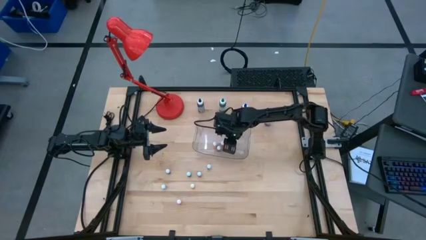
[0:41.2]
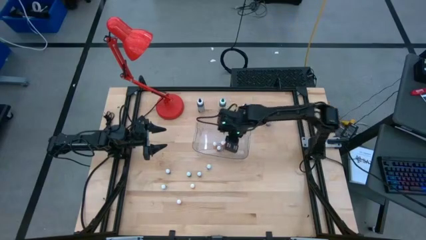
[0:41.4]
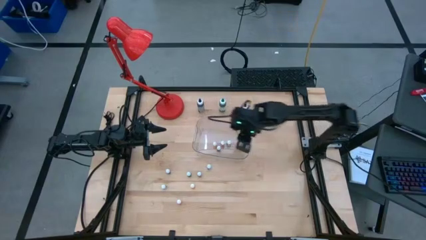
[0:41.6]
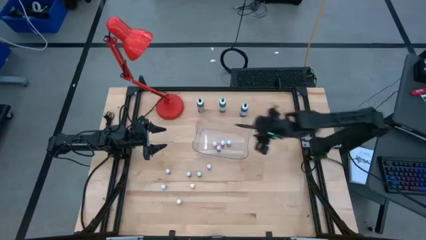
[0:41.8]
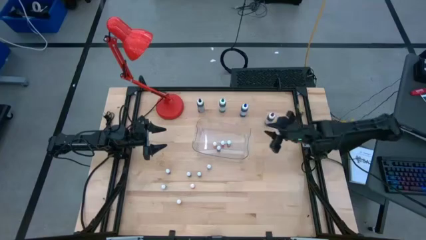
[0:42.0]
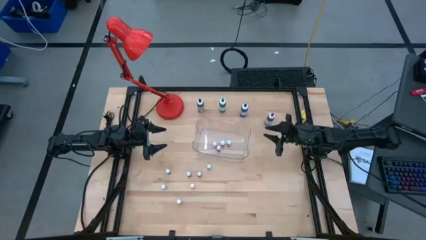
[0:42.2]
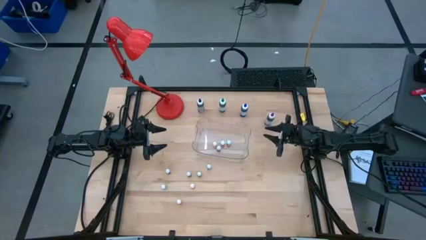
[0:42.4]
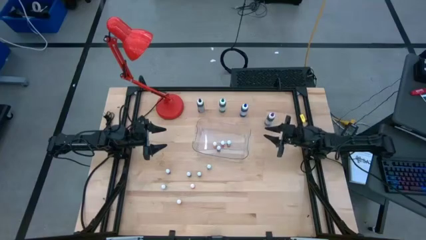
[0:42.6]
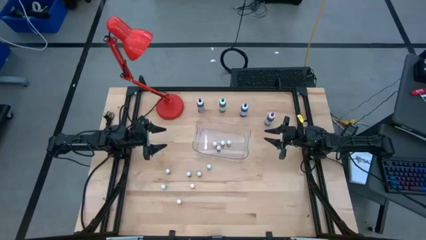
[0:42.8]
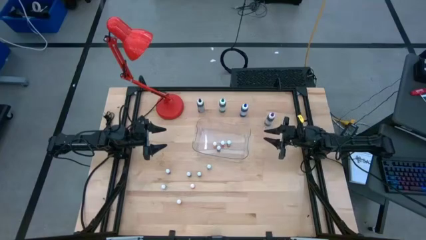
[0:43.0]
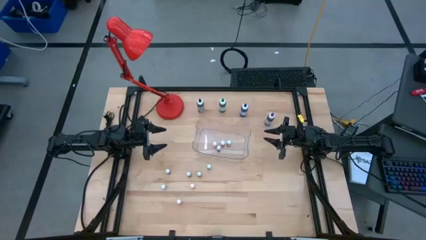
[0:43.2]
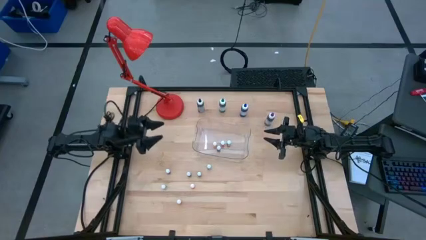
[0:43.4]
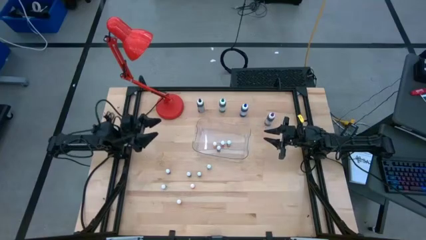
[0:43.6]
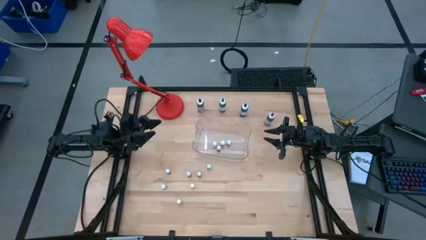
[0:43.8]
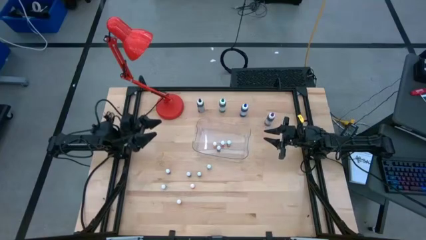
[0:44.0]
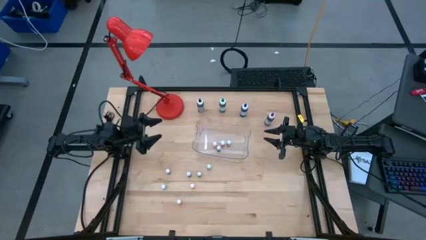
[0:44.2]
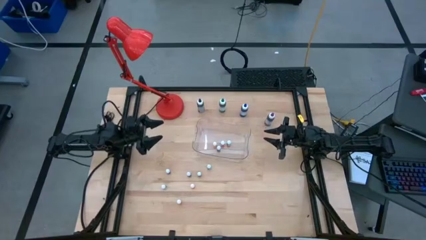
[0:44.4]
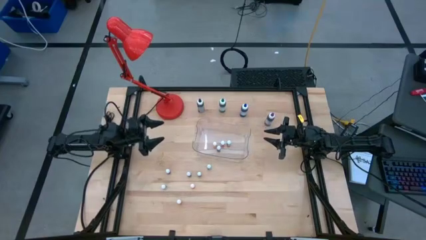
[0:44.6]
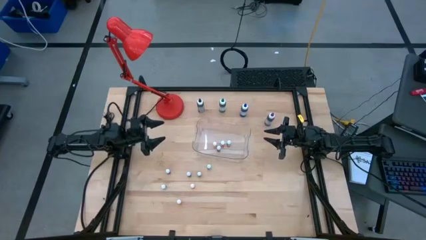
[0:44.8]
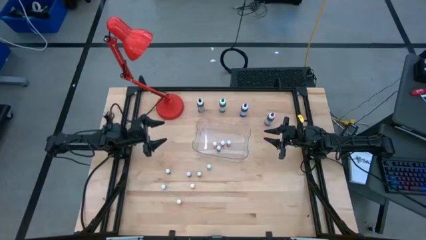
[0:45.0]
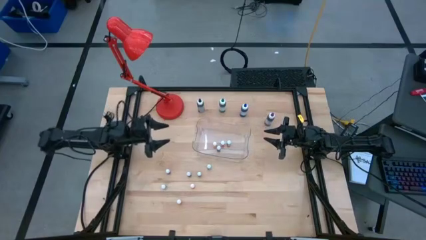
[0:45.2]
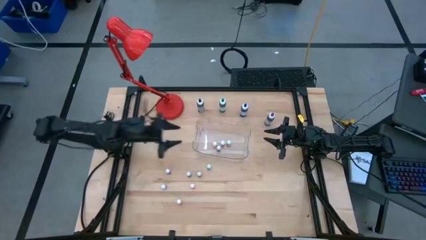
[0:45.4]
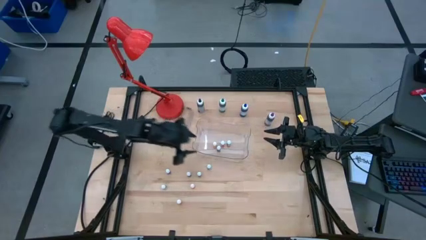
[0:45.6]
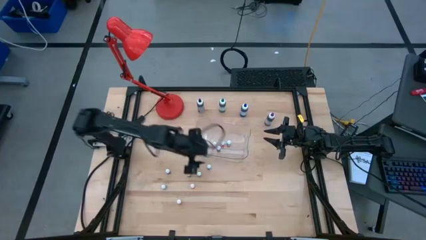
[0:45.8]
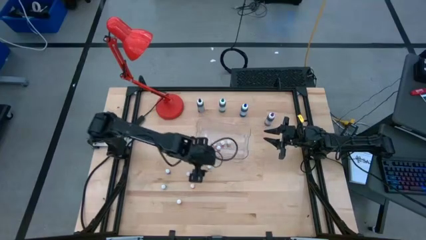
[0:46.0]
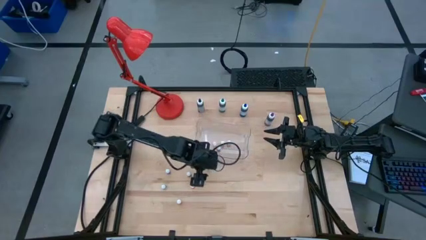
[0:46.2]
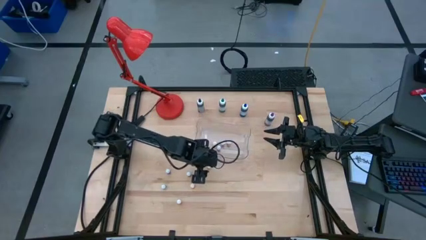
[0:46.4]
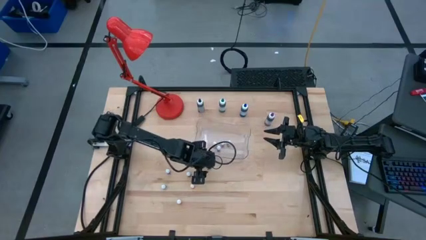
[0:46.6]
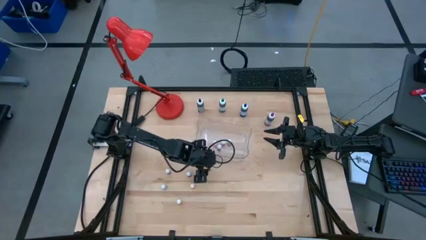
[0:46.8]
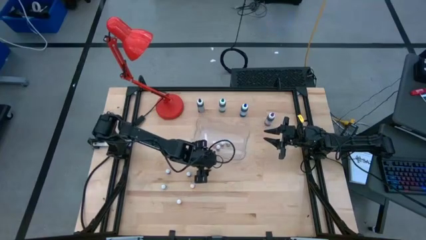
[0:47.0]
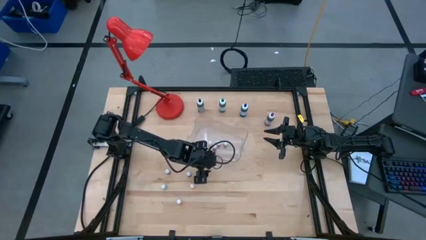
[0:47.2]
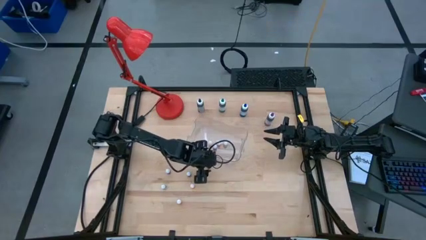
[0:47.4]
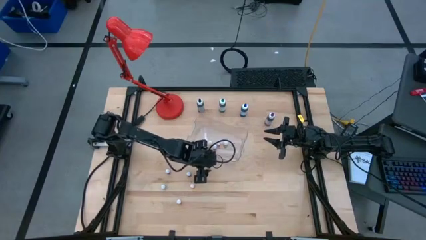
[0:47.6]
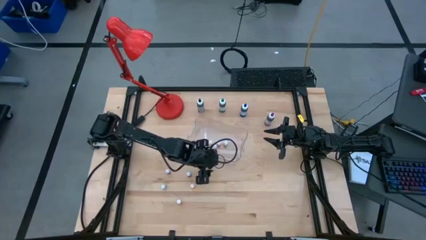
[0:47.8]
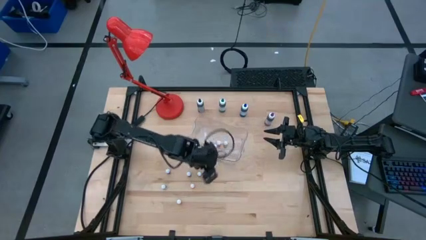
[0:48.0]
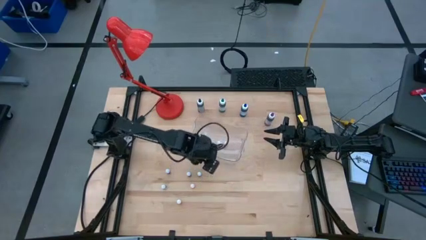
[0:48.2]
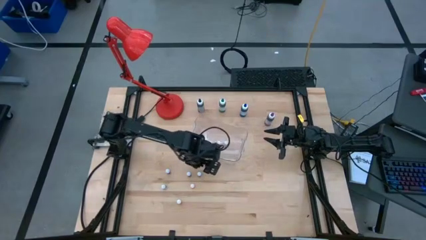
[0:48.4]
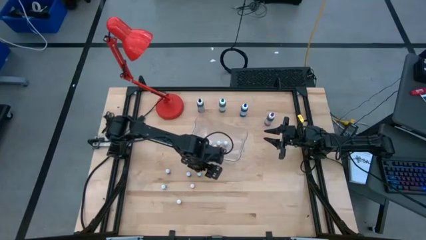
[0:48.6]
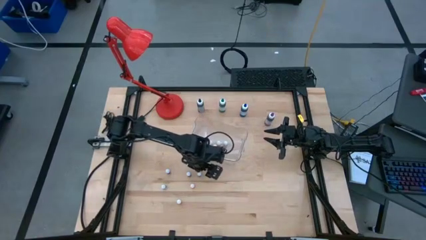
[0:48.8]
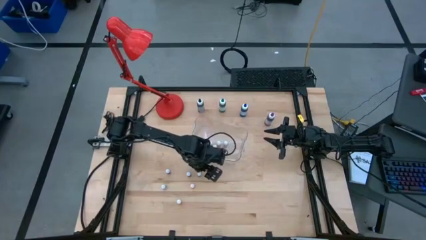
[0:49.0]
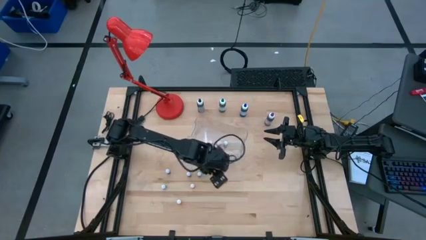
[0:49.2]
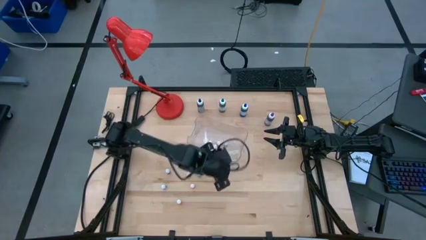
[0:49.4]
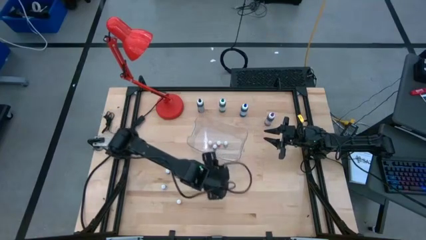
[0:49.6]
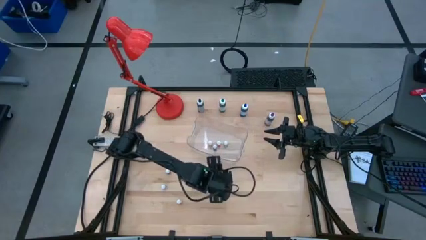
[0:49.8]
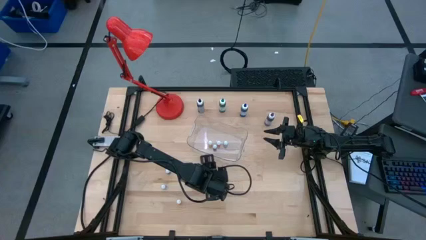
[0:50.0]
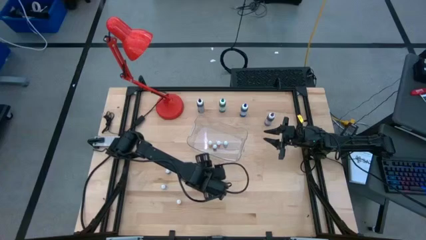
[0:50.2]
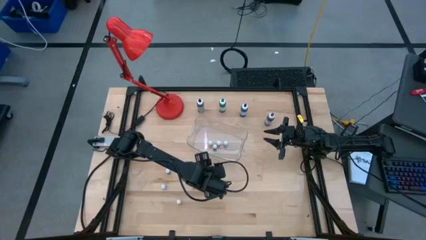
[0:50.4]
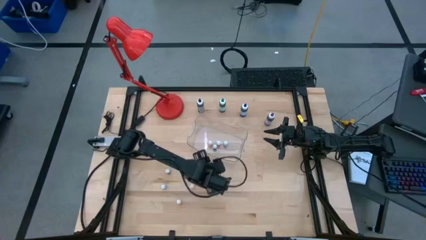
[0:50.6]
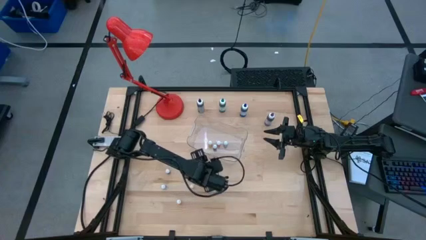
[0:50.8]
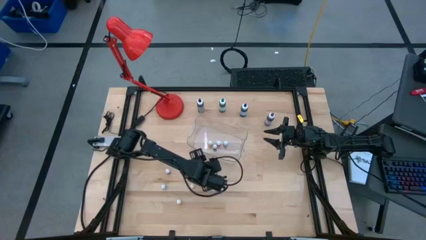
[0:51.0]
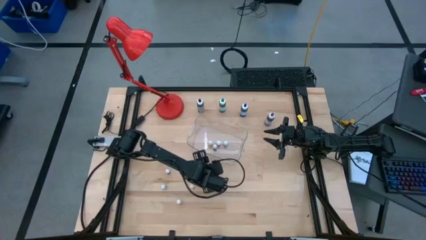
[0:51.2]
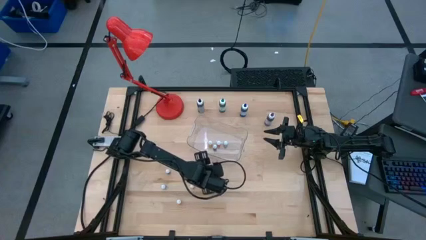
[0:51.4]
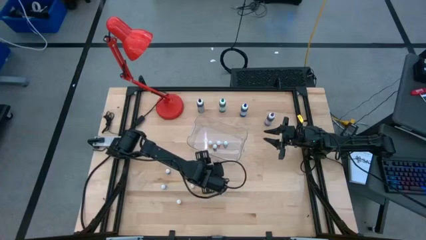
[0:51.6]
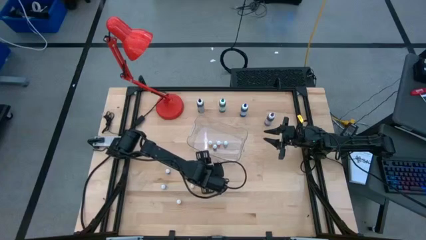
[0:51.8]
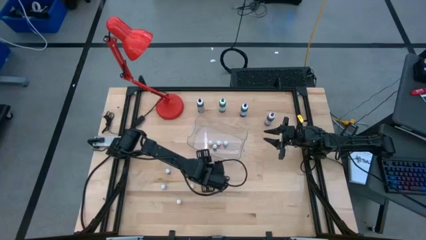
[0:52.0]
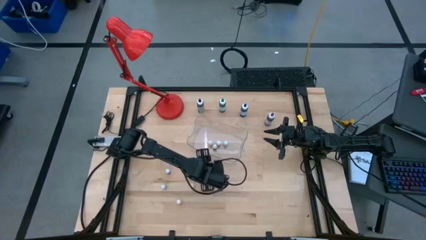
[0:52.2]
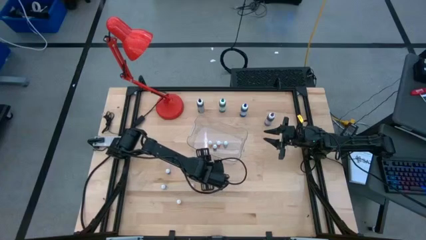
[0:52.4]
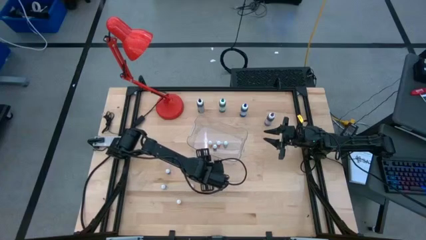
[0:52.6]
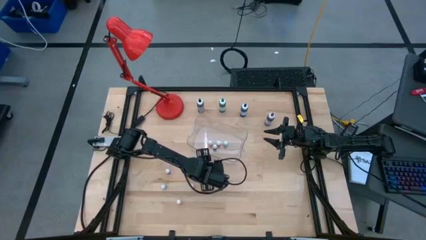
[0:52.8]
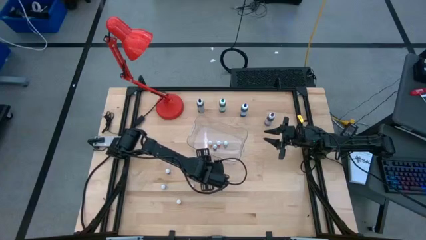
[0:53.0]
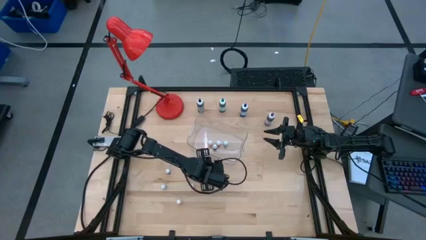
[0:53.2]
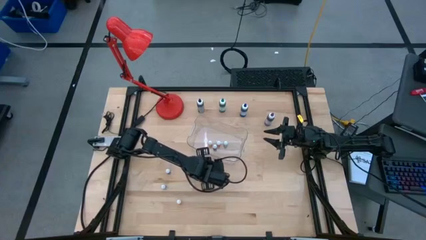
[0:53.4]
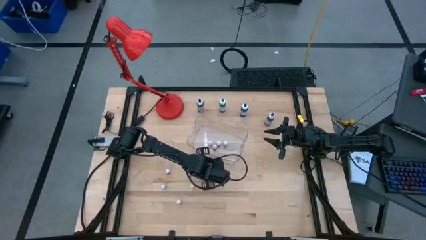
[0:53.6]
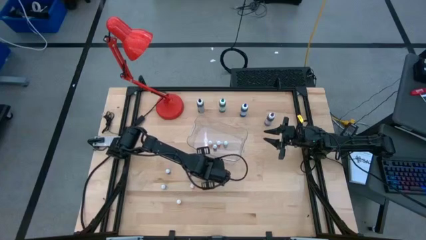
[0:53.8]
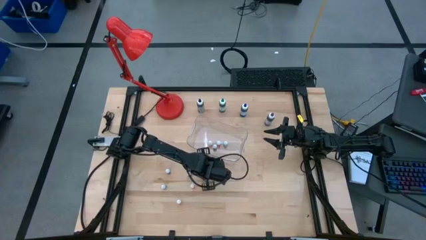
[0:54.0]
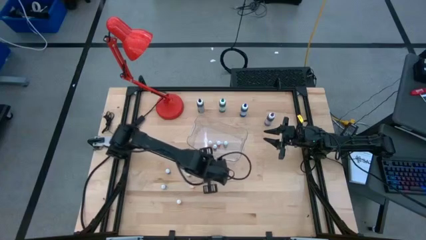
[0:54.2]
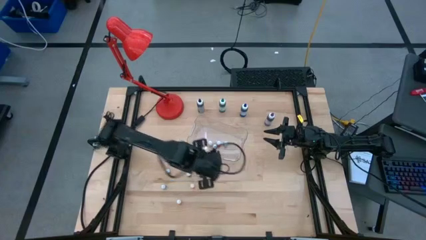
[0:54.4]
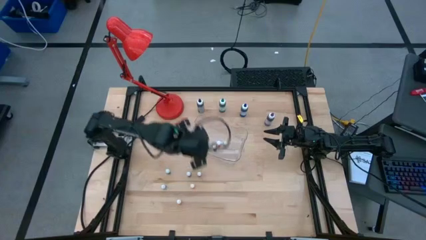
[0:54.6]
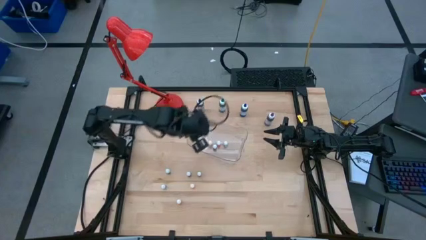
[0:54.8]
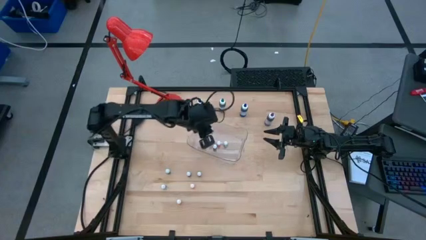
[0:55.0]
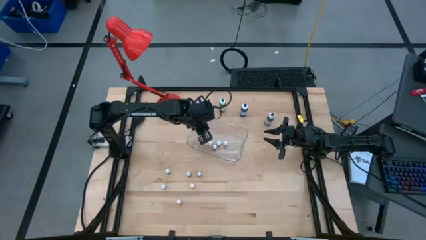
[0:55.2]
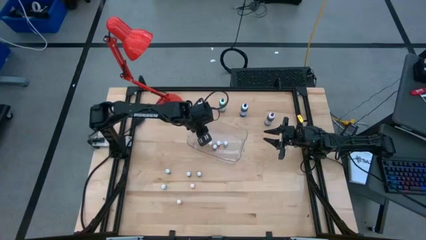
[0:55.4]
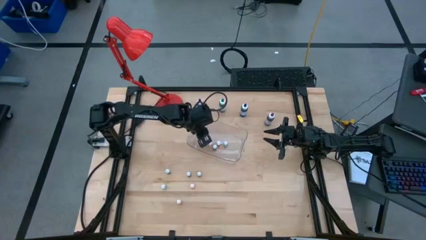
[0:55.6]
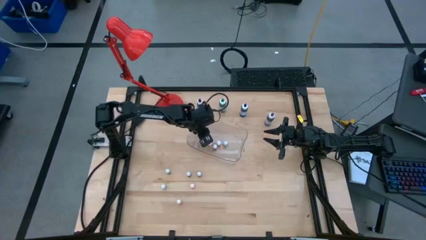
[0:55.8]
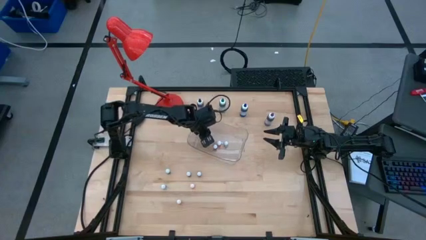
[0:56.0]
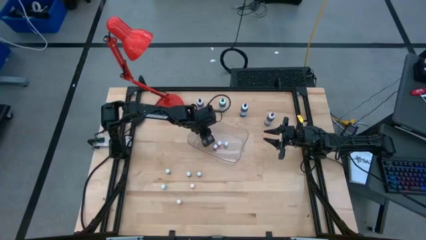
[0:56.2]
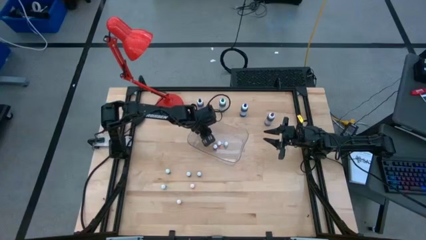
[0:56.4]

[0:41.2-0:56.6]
Task: Pick & Place food coloring
Put the top small purple food coloring bottle in the transparent bin
